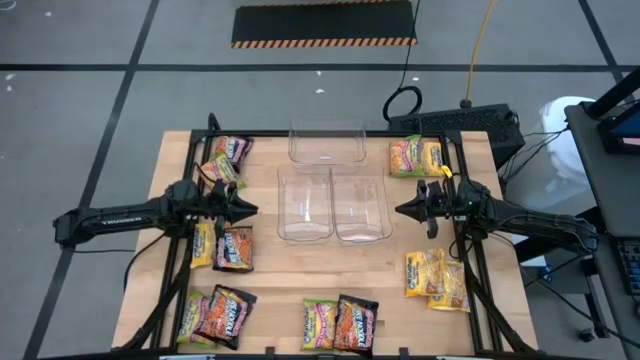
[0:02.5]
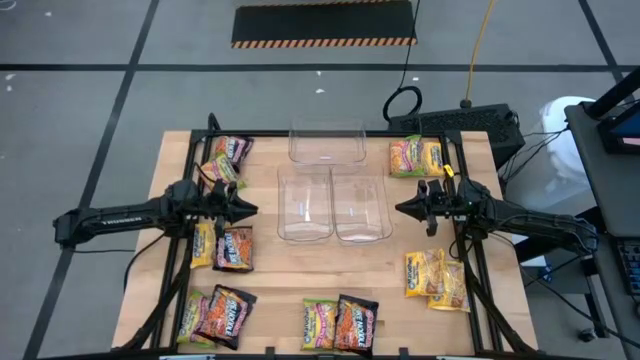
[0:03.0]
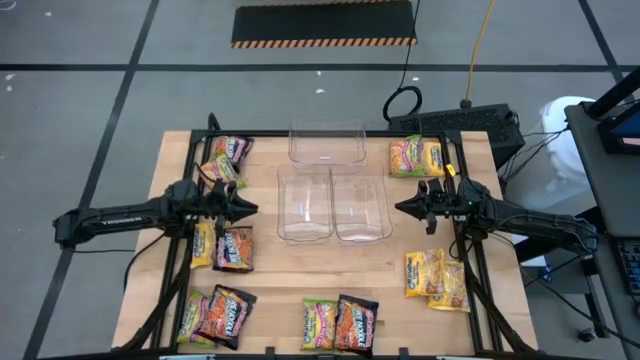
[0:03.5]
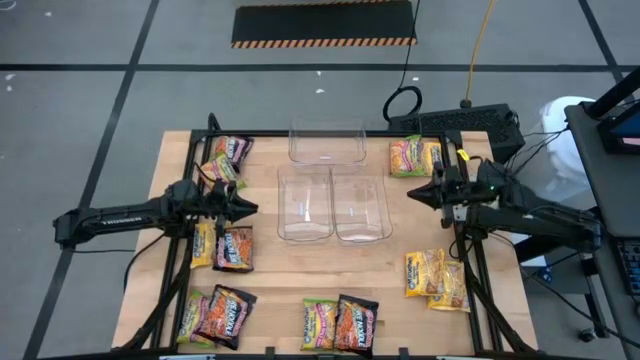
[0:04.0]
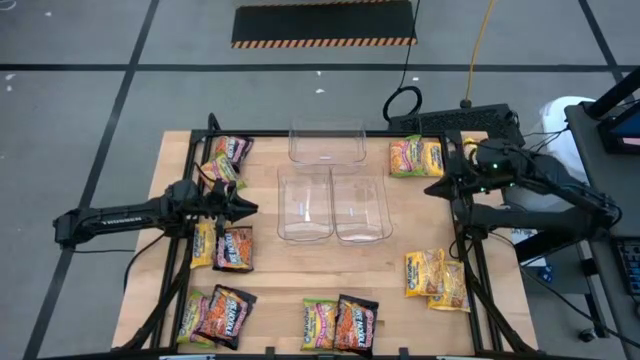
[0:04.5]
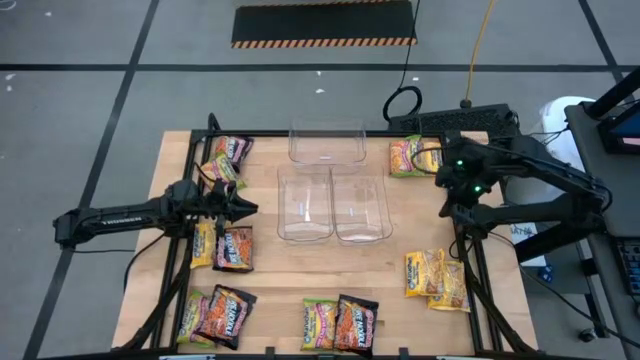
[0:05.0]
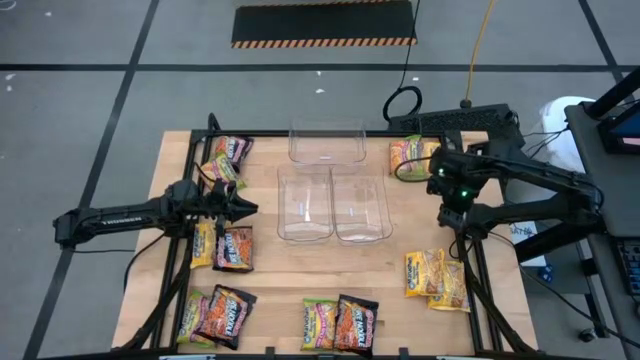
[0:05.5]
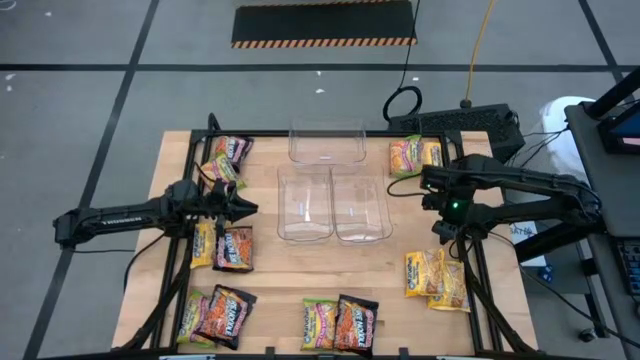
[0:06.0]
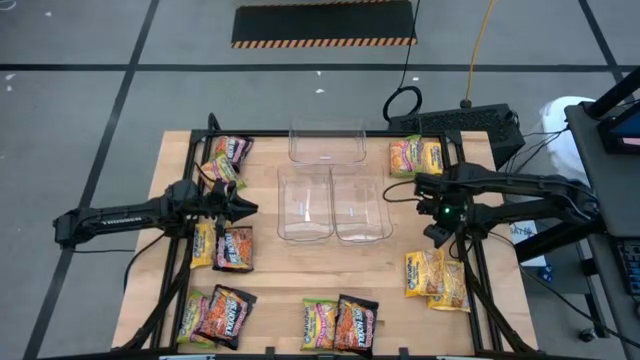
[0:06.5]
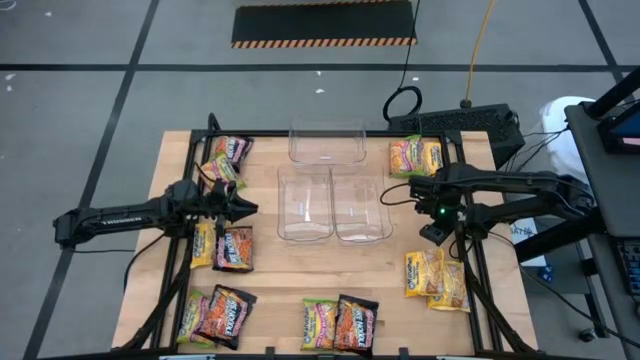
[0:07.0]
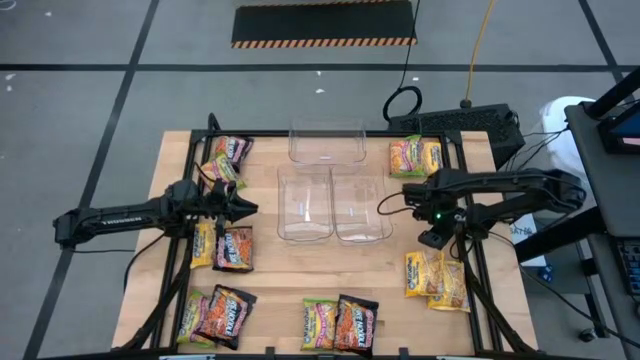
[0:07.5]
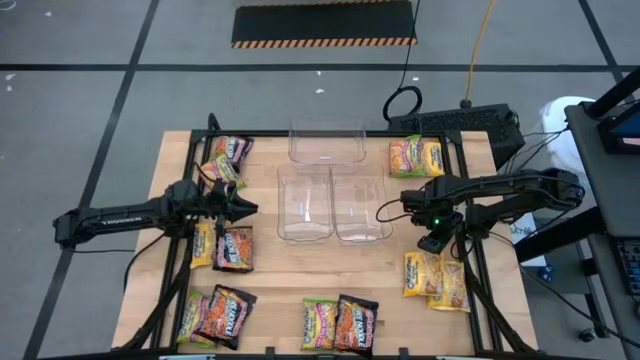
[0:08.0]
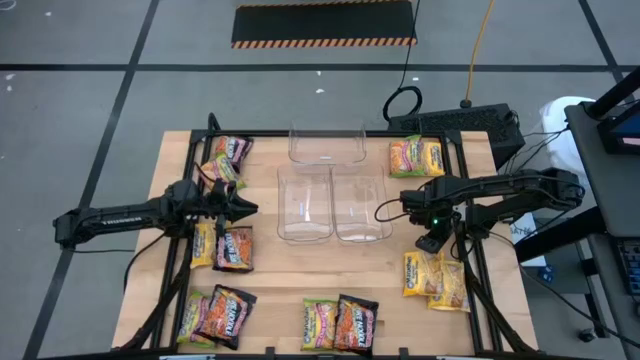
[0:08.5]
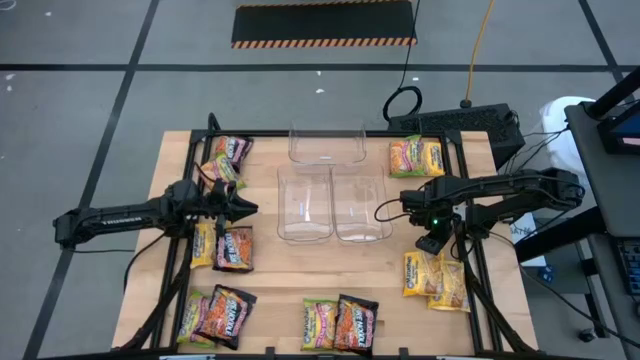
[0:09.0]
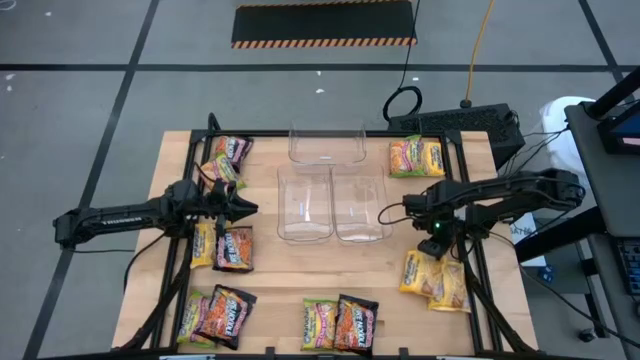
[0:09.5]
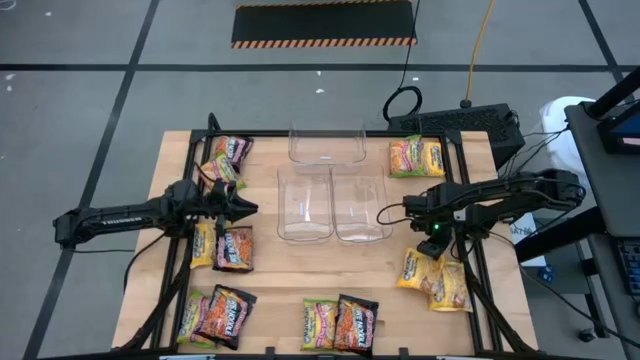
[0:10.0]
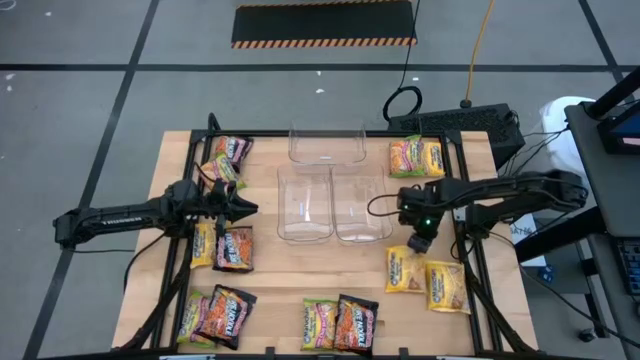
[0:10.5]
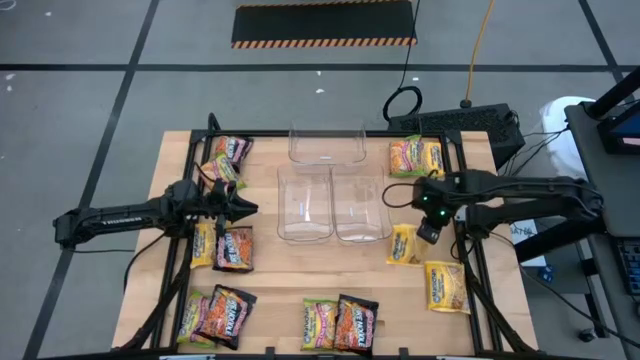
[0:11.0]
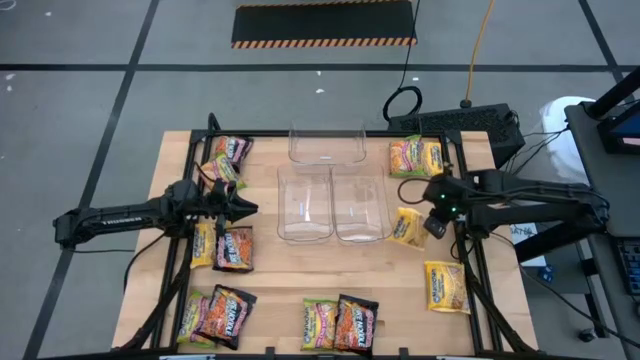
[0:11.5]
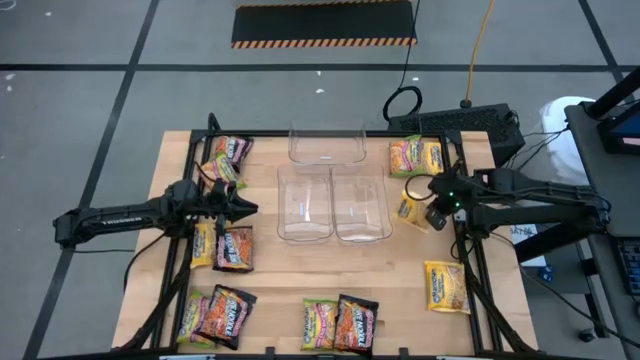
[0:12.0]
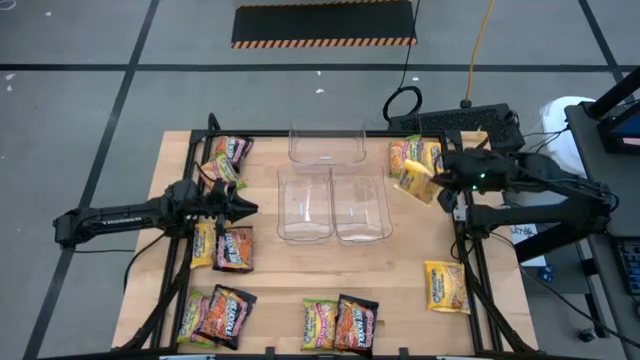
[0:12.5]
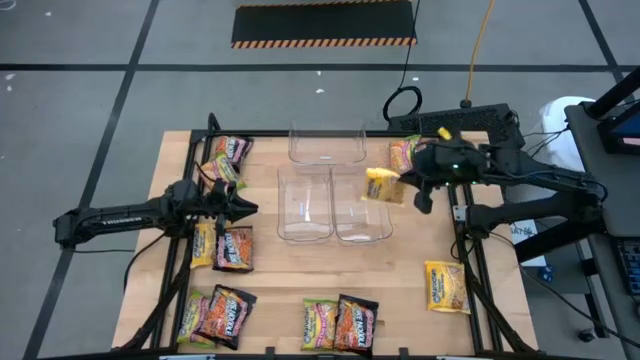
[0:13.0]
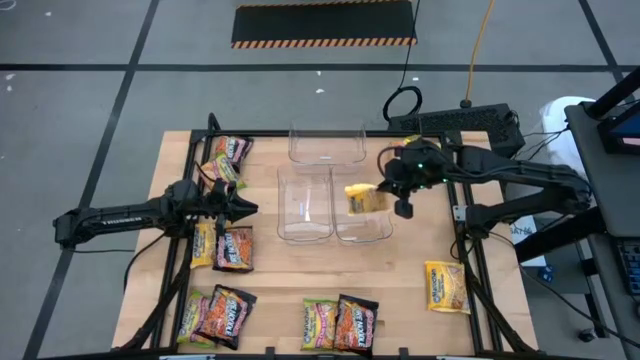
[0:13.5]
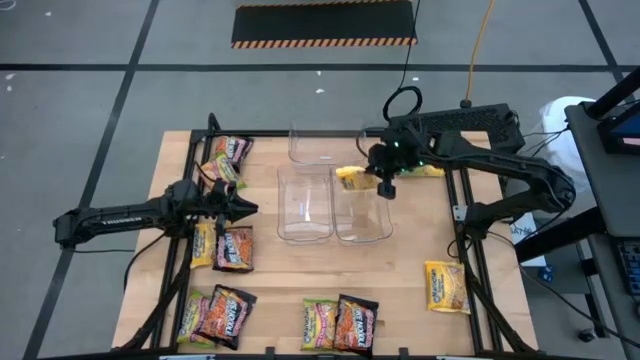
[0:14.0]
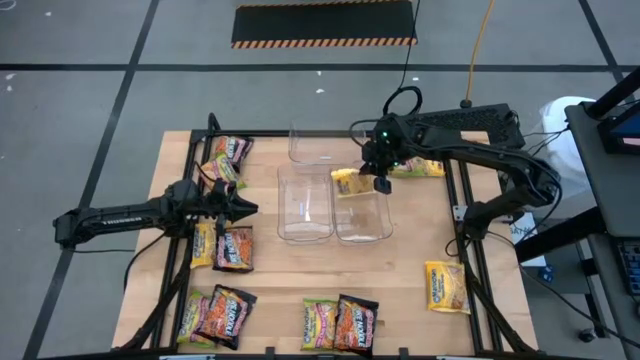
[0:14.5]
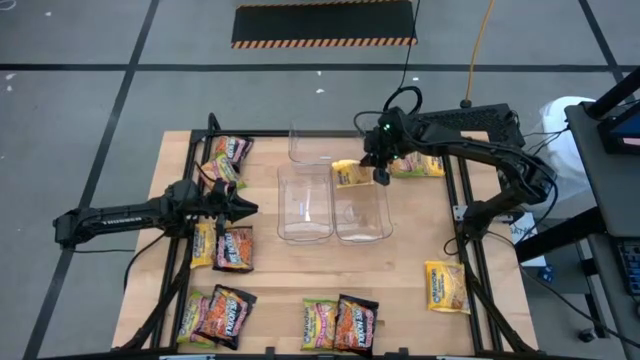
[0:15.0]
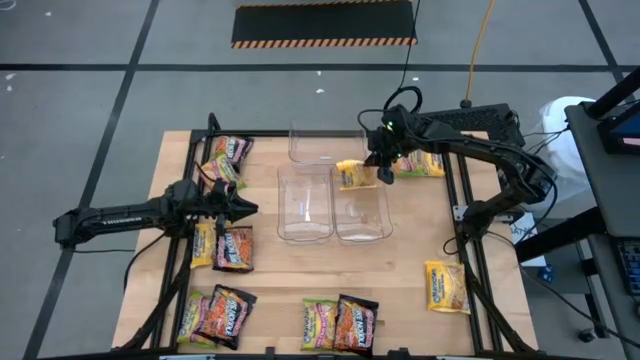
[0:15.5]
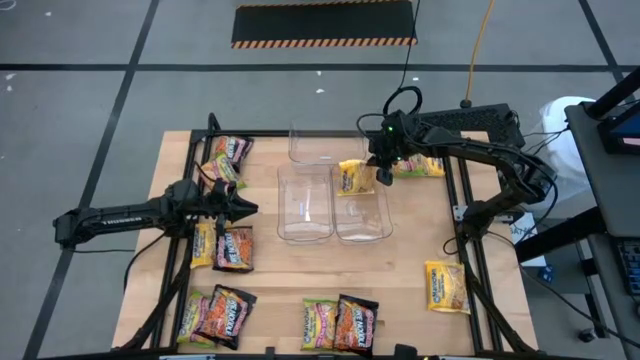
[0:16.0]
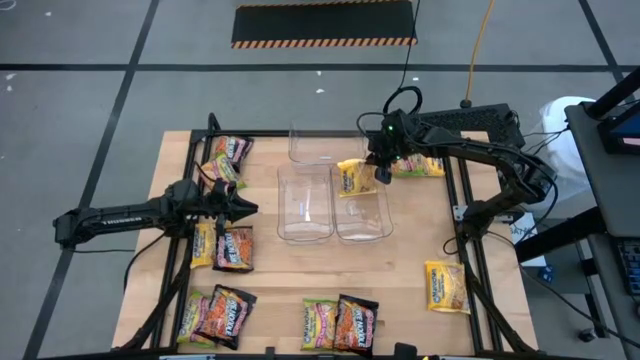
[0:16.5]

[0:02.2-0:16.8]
Task: Sort Maruchan noodles
Put the yellow noodle pack into the right transparent bin

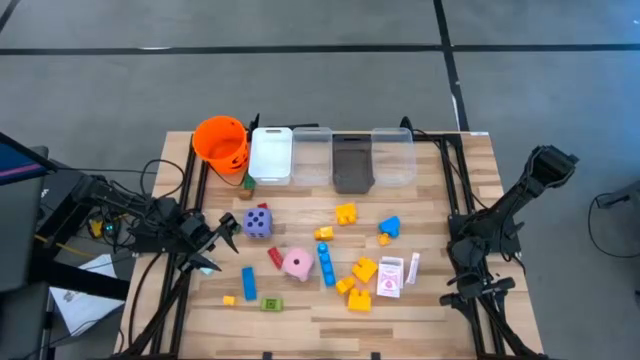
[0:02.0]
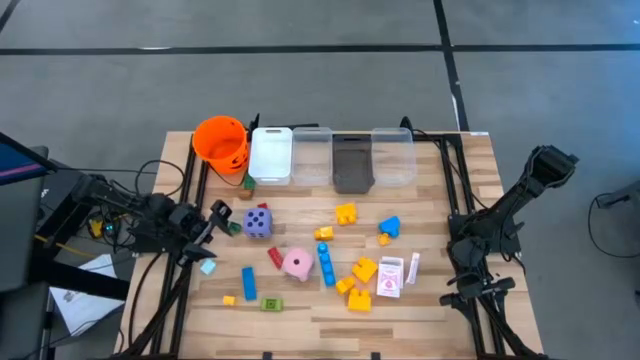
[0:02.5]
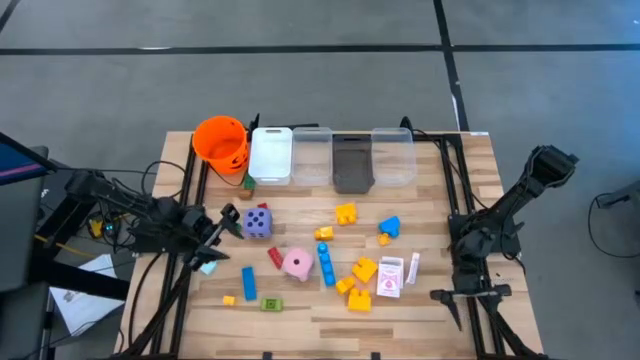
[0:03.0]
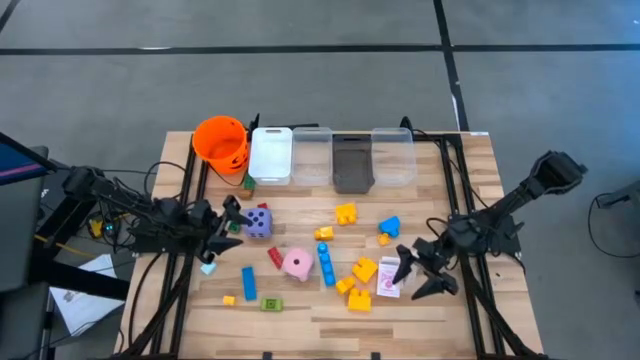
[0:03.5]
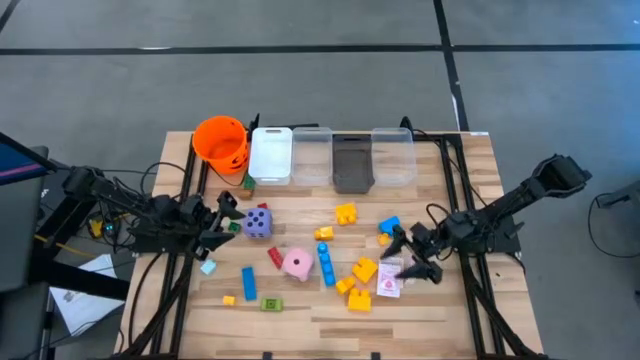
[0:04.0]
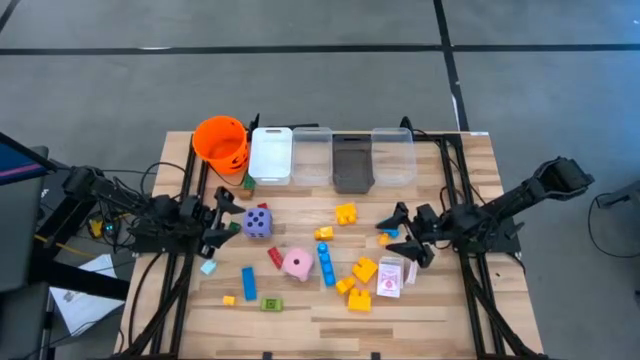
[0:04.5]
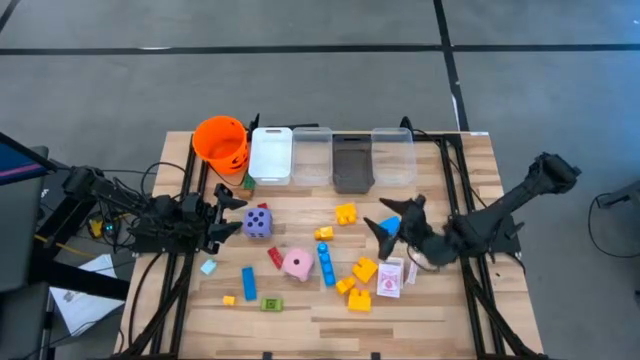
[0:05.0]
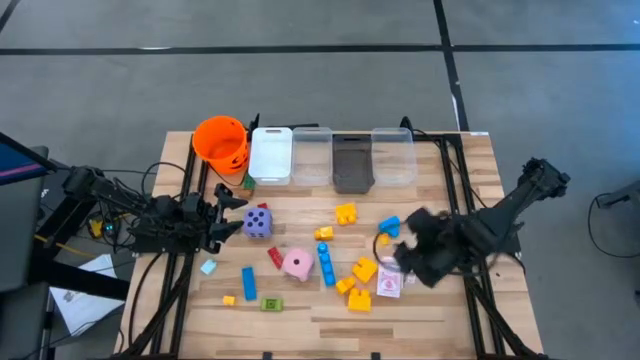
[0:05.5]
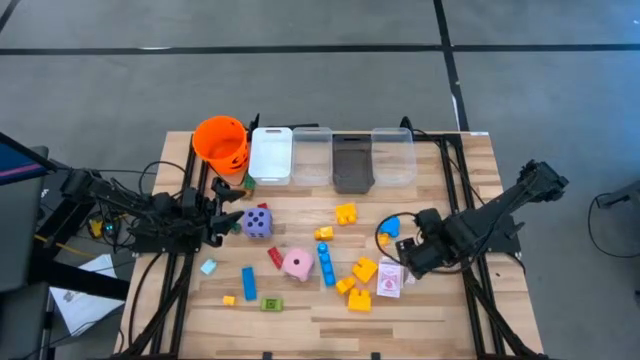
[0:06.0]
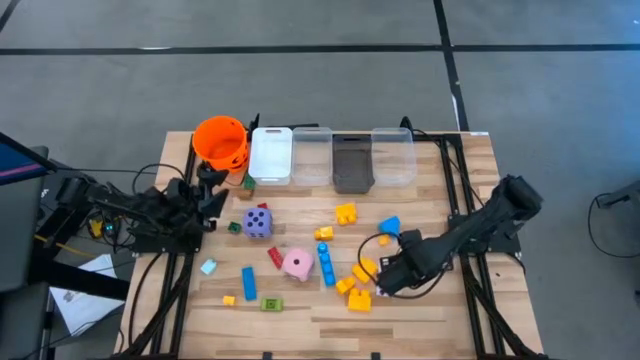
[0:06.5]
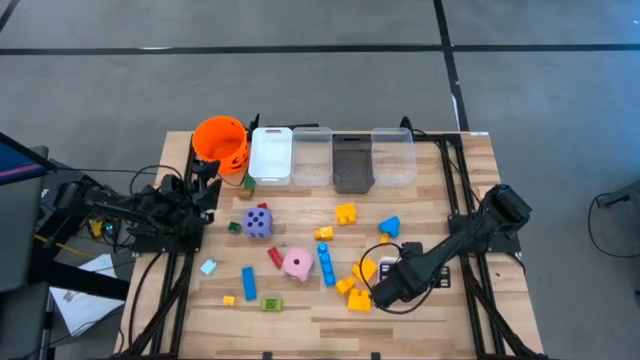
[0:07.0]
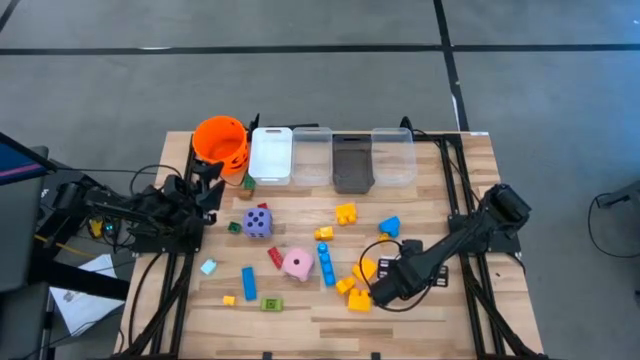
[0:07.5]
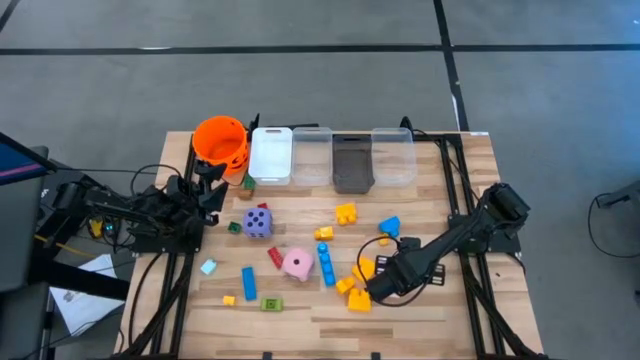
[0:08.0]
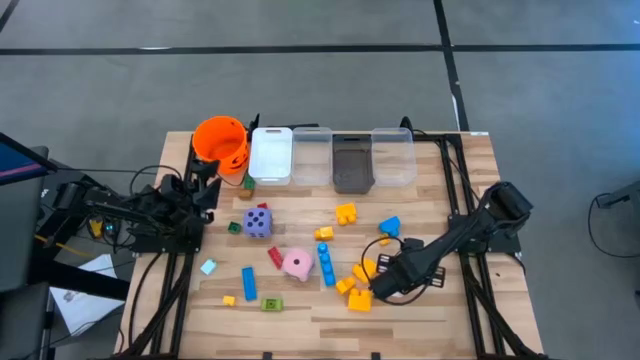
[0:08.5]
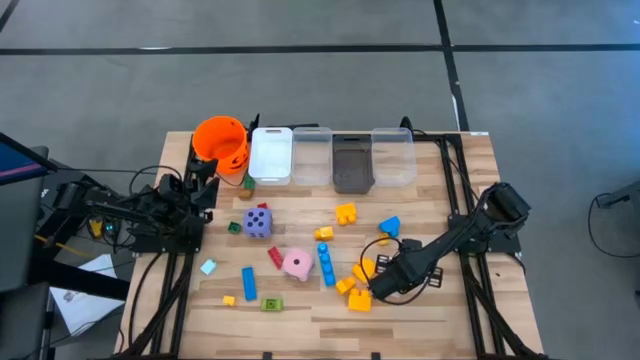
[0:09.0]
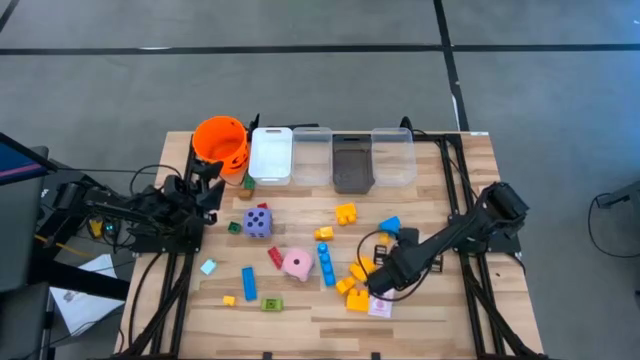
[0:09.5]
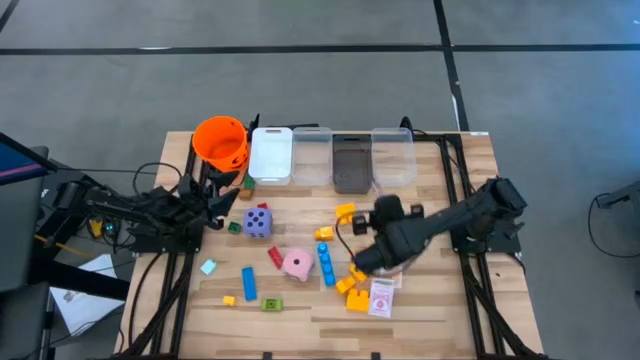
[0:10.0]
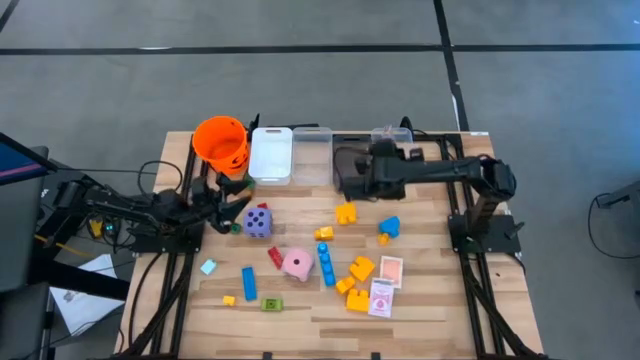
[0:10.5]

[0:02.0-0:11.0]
Task: Pick & Place Toys
Put the red deck of cards into the right transparent bin
